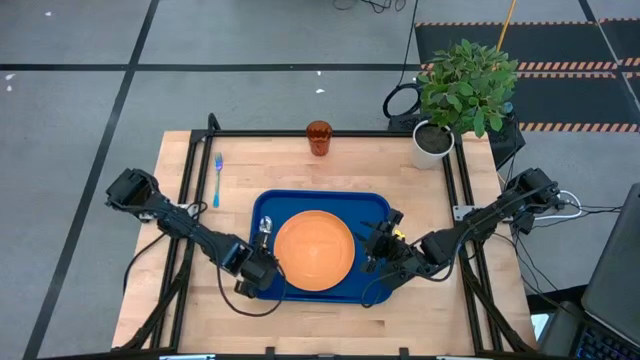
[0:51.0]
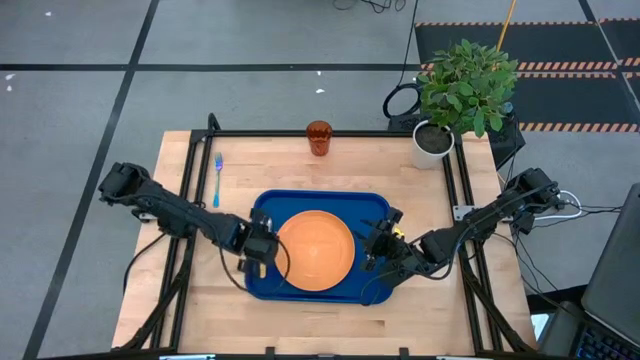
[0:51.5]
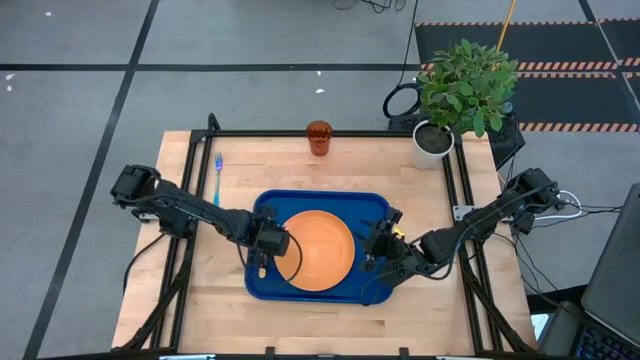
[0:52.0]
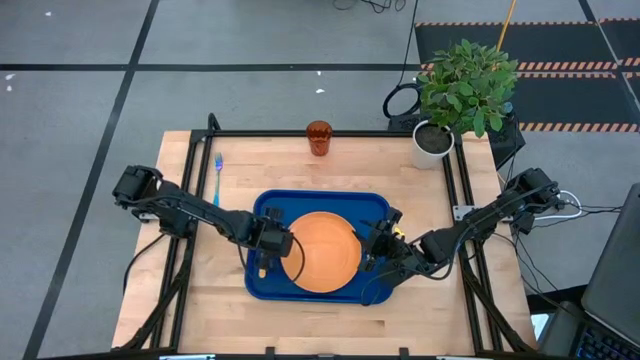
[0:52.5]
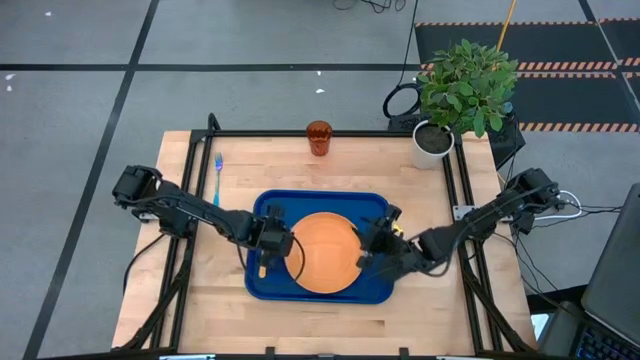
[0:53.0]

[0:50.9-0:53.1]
Task: Pick and place plate/cup/fork/spoon on tray
Adjust the orange plate on the blue serving tray

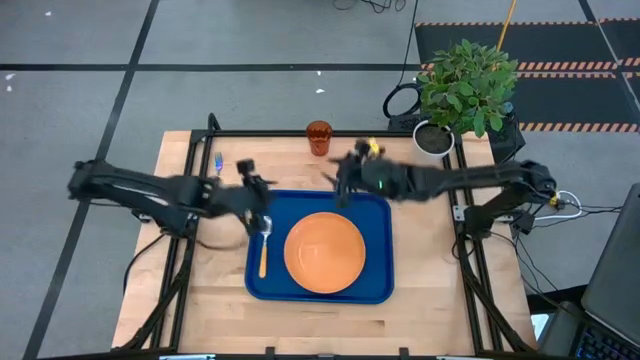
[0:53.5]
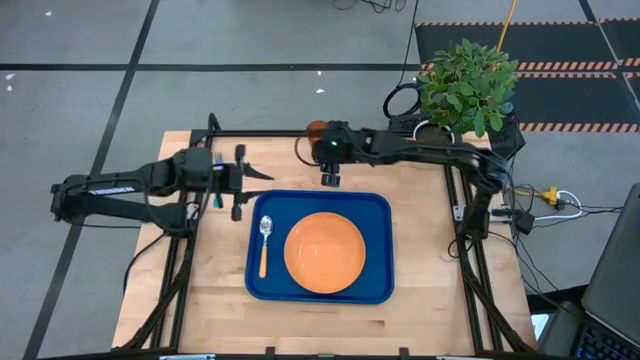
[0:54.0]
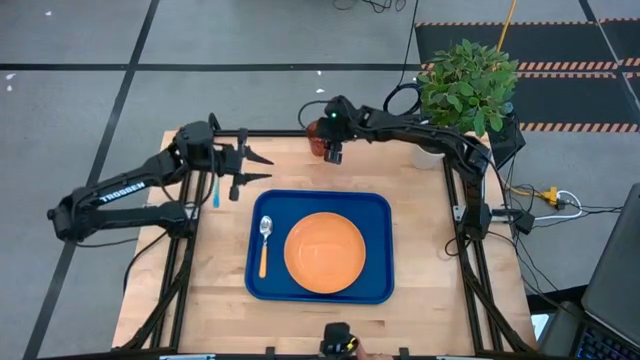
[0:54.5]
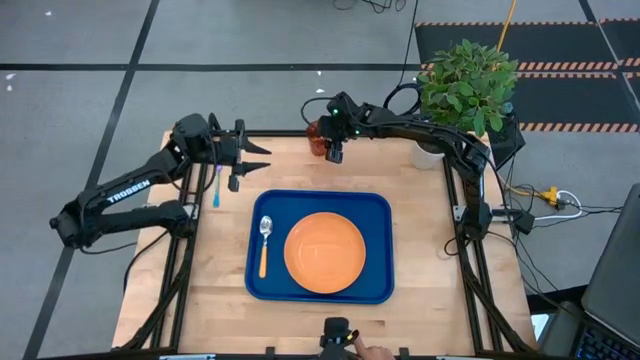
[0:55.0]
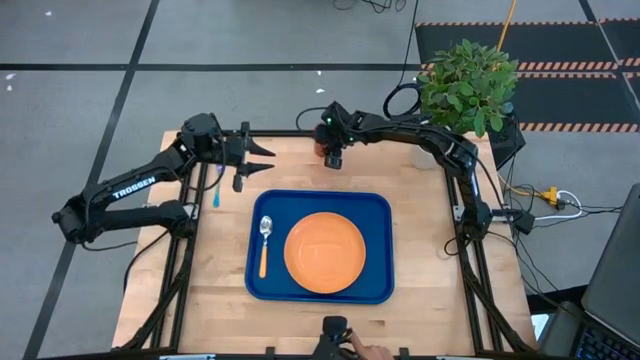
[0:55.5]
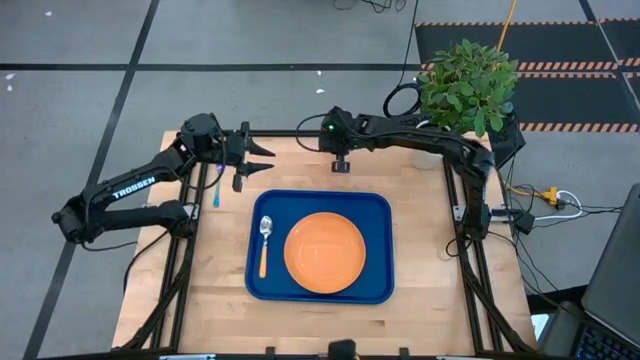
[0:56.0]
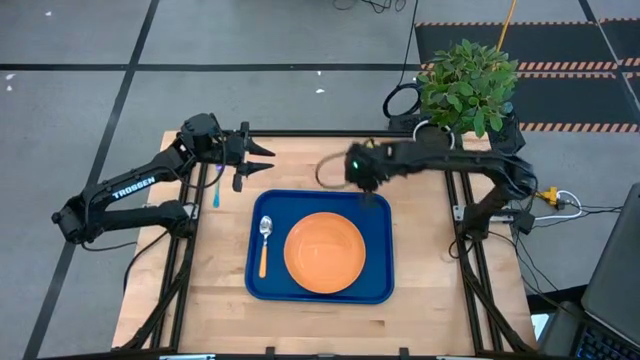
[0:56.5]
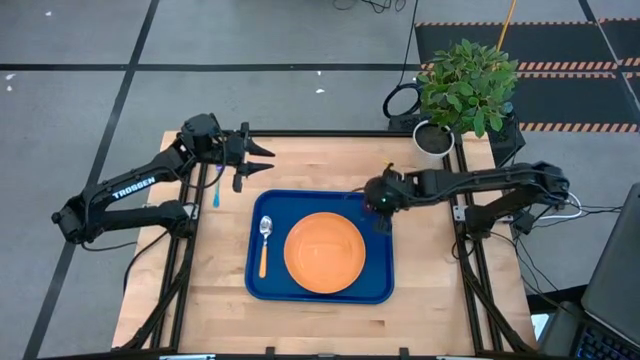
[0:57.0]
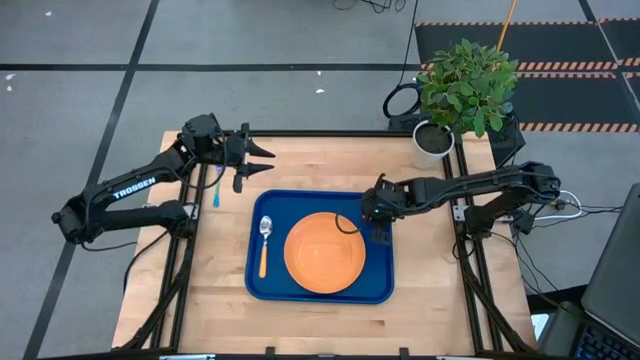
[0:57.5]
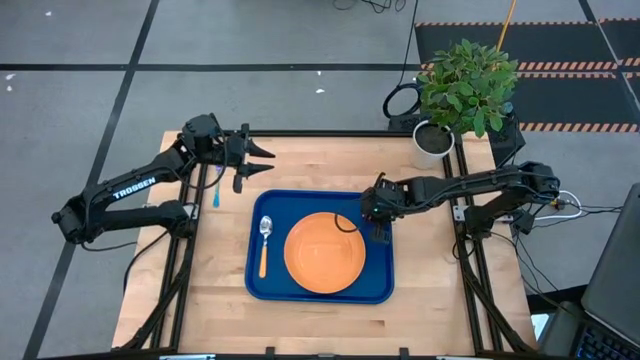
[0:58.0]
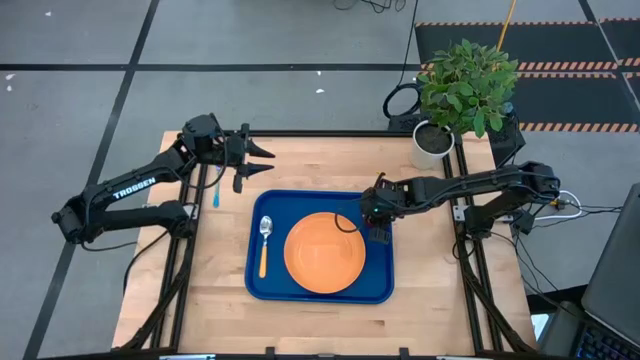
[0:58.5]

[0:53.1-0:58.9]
Put the brown glass on the blue serving tray to the top right of the orange plate

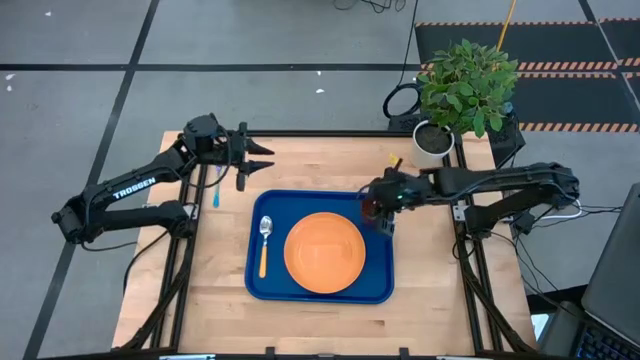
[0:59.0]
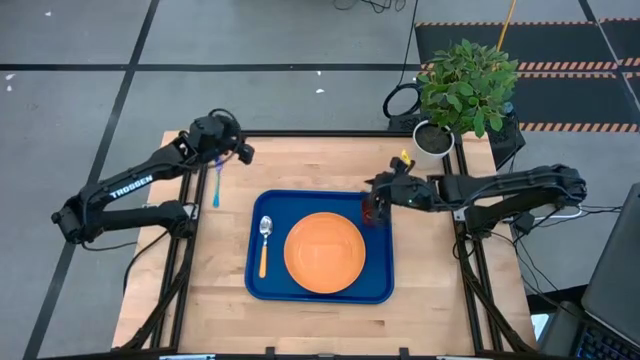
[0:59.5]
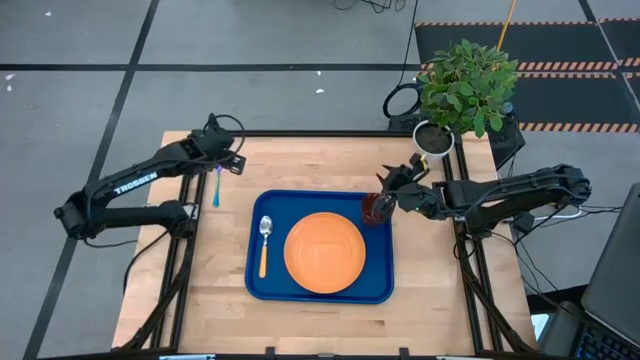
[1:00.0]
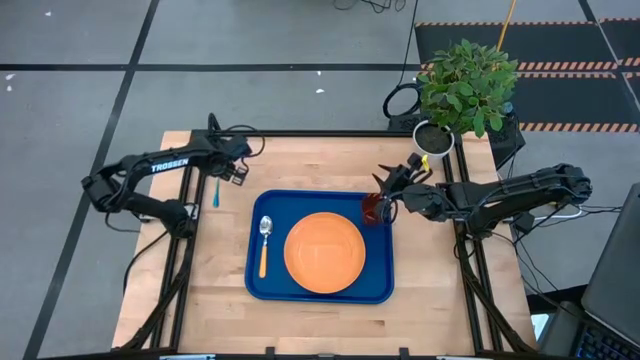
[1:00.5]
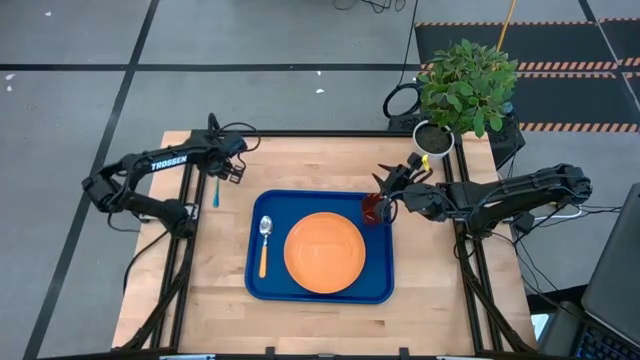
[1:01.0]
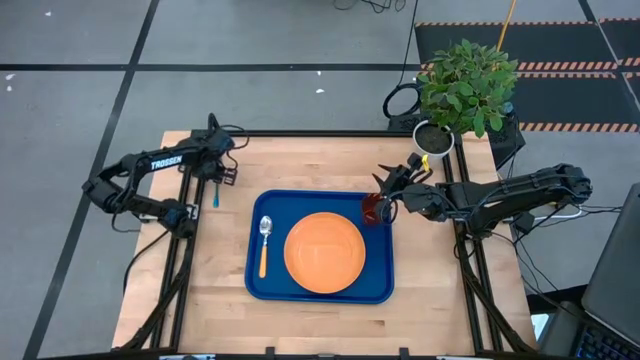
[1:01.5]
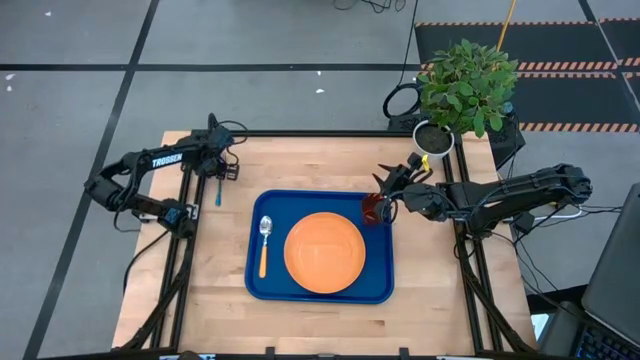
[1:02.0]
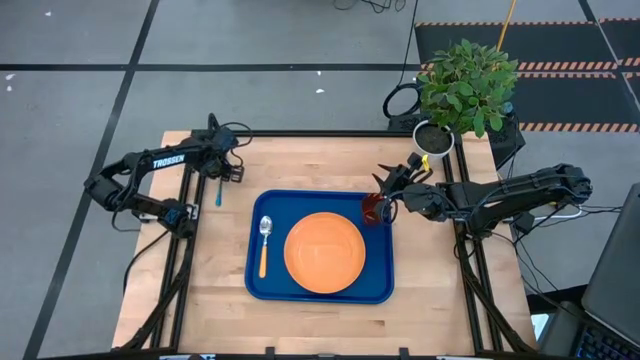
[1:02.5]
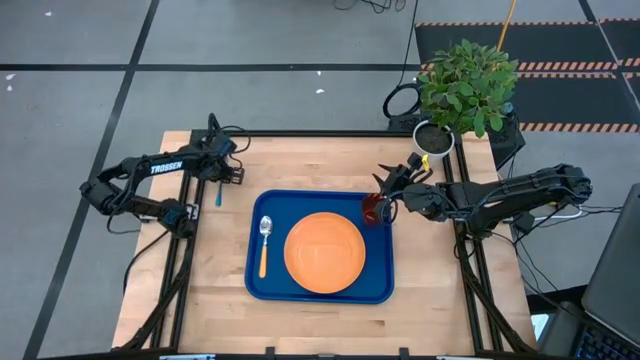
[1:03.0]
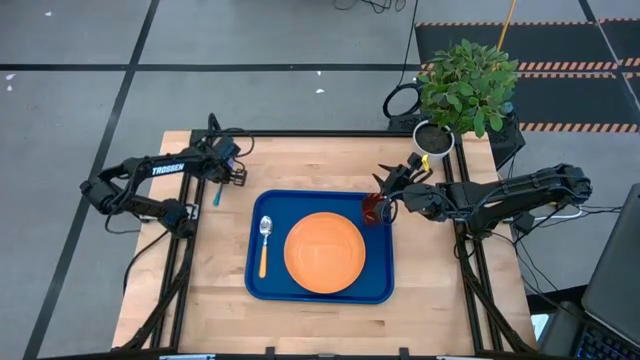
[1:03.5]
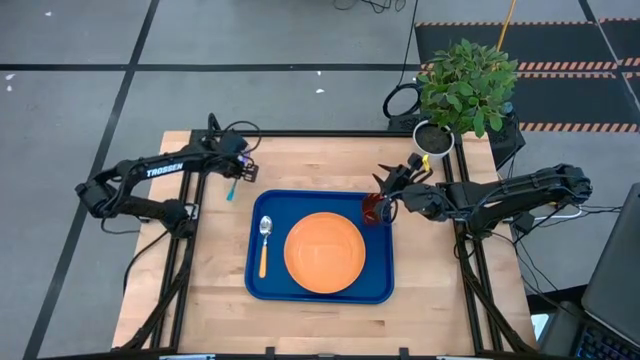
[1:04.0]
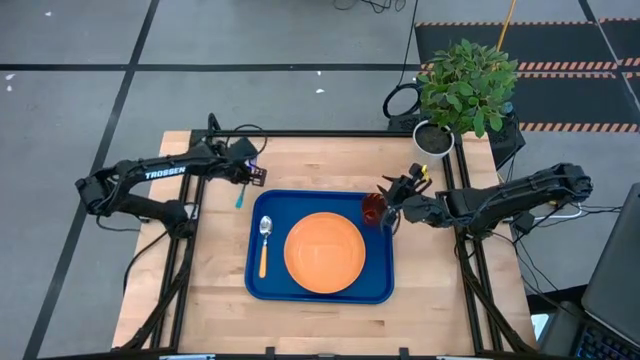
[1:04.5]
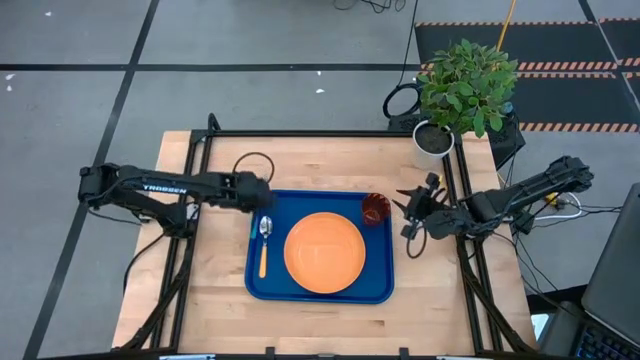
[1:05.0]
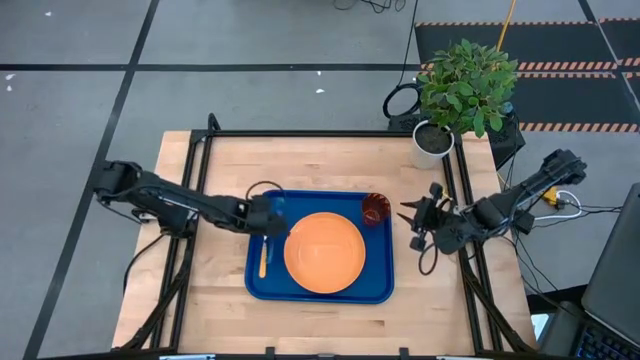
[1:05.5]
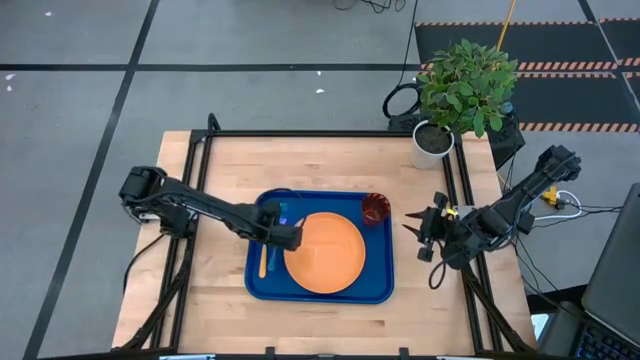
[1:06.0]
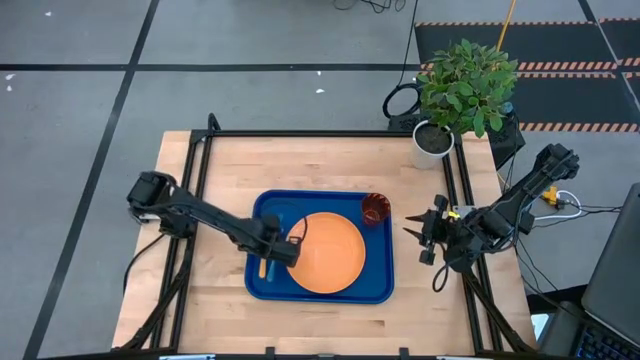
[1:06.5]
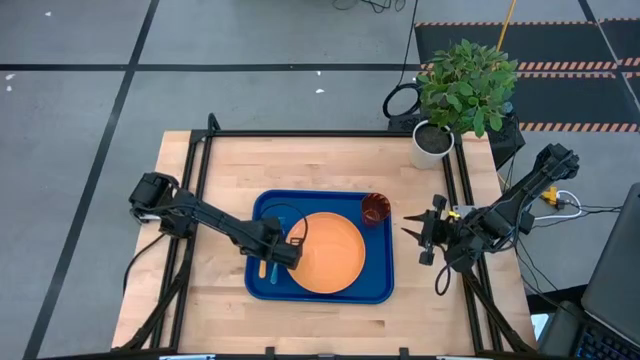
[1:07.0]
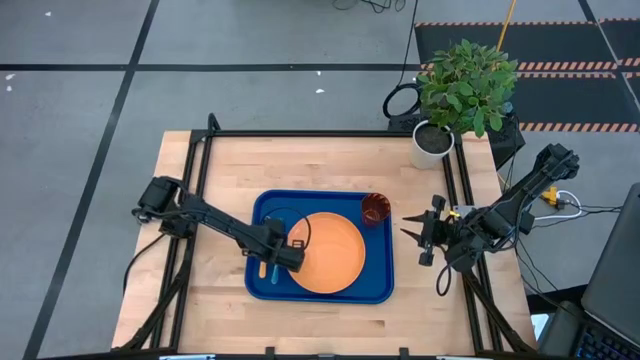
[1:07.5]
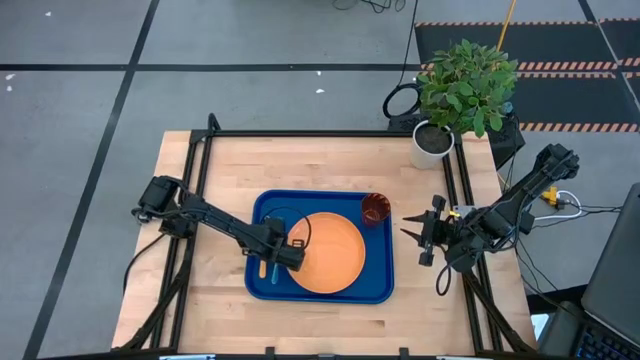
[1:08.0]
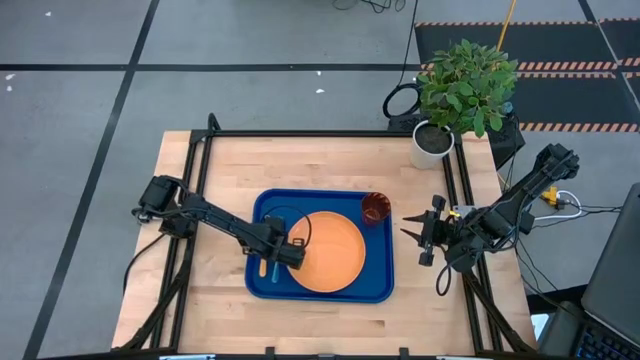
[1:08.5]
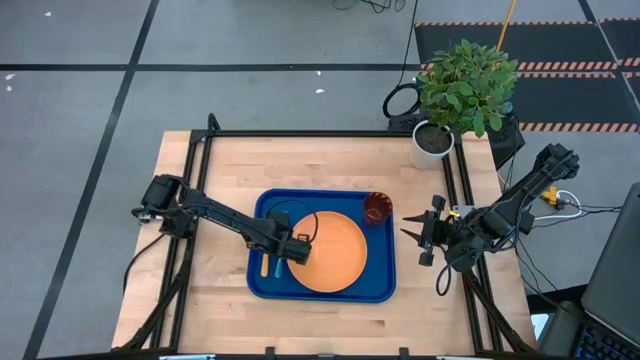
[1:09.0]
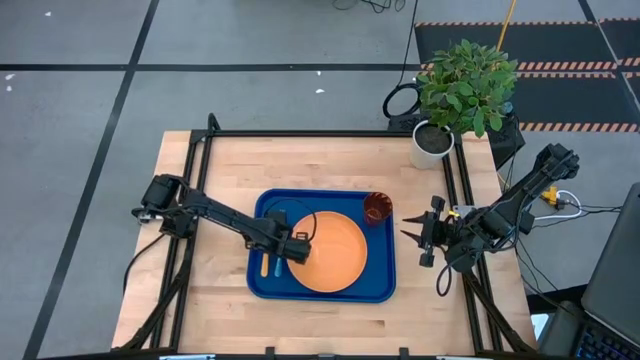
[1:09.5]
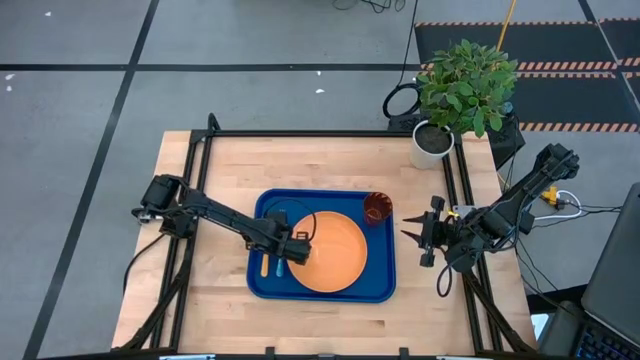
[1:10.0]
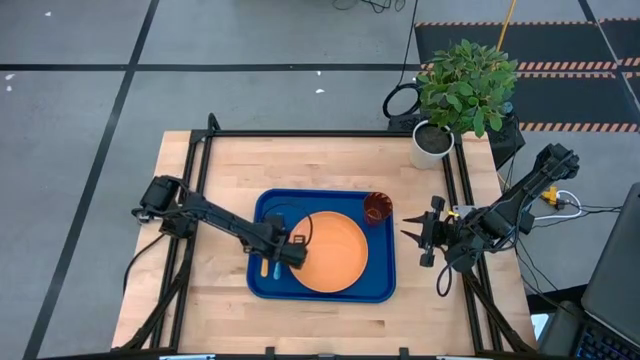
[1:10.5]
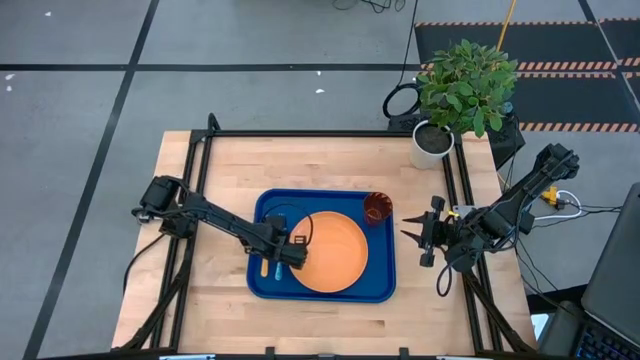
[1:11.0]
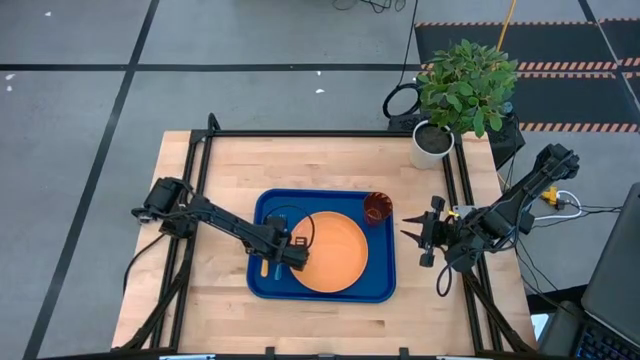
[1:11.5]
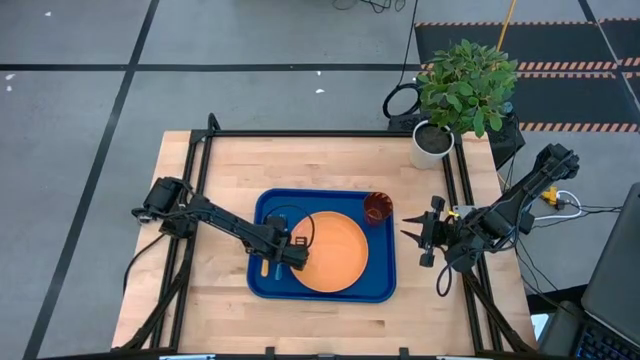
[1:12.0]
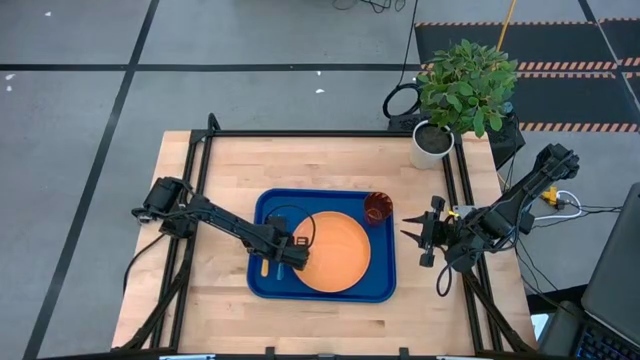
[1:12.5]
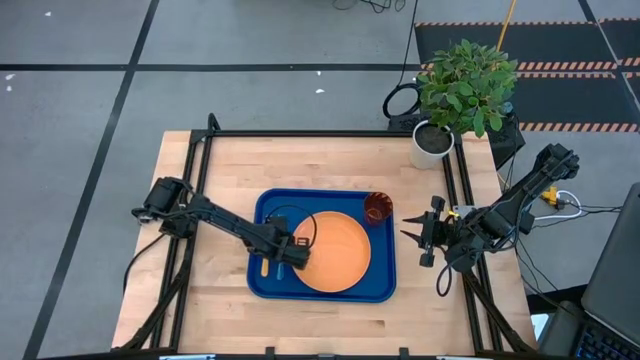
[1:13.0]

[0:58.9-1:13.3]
Put the blue fork on the blue serving tray to the left of the orange plate
